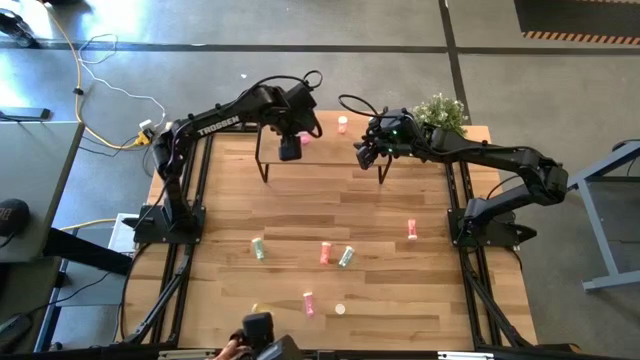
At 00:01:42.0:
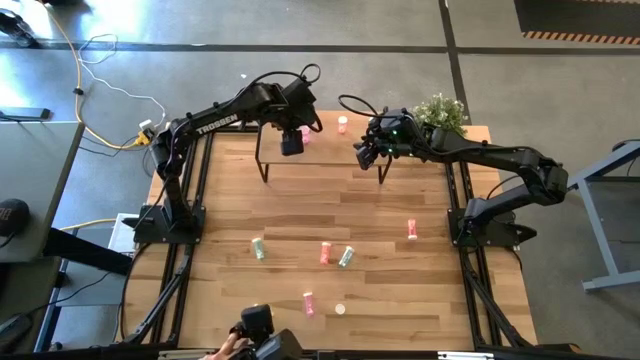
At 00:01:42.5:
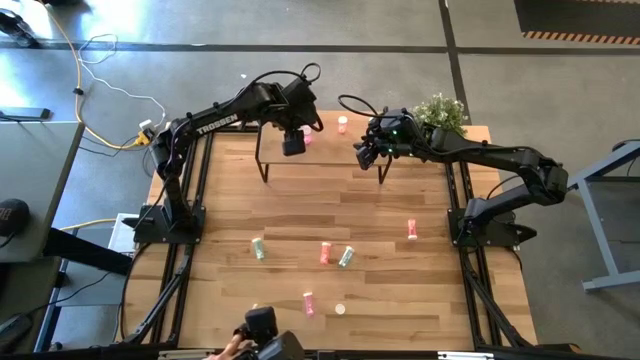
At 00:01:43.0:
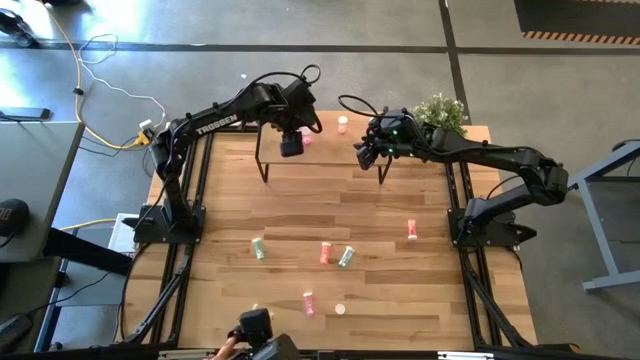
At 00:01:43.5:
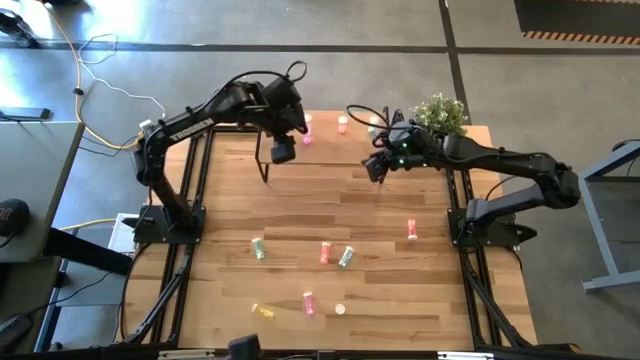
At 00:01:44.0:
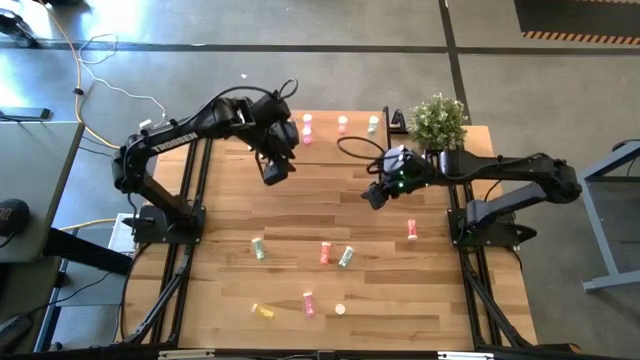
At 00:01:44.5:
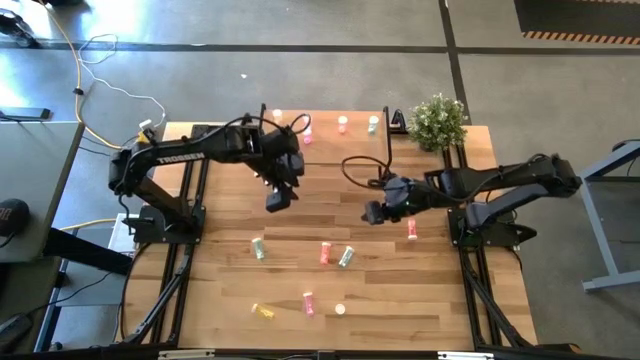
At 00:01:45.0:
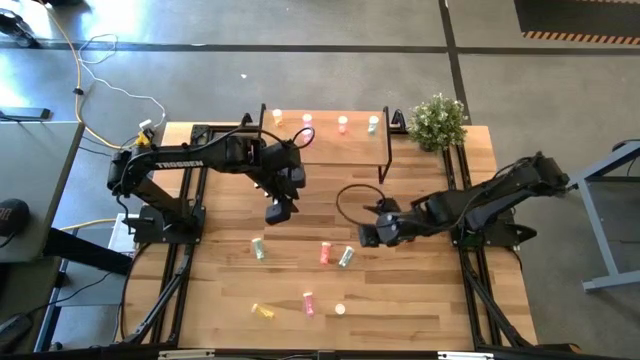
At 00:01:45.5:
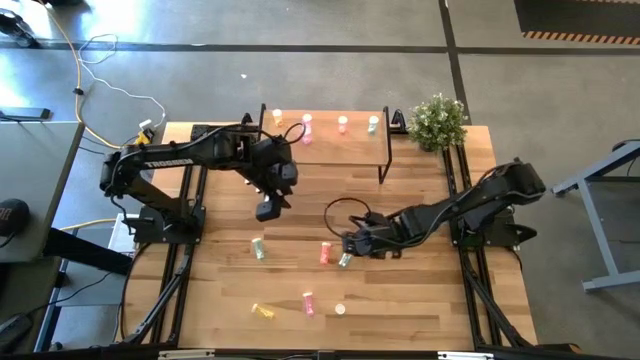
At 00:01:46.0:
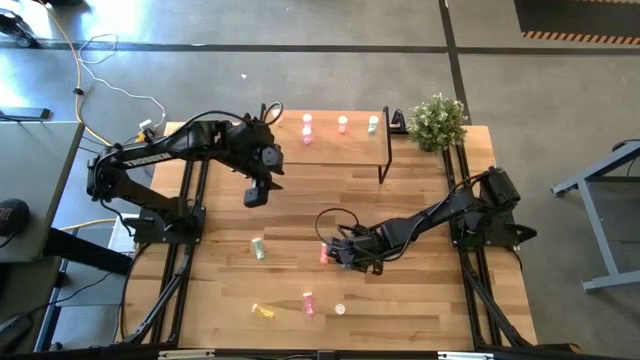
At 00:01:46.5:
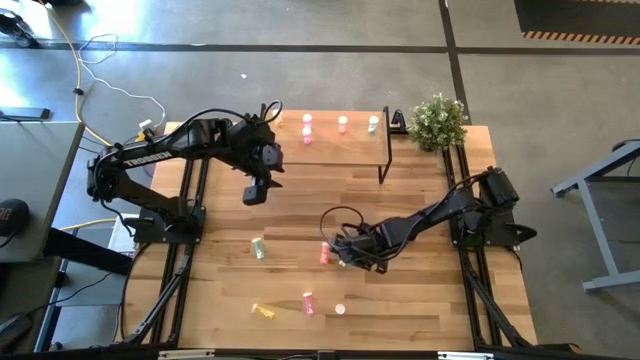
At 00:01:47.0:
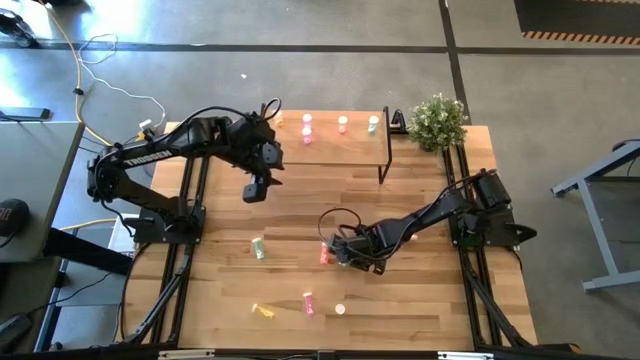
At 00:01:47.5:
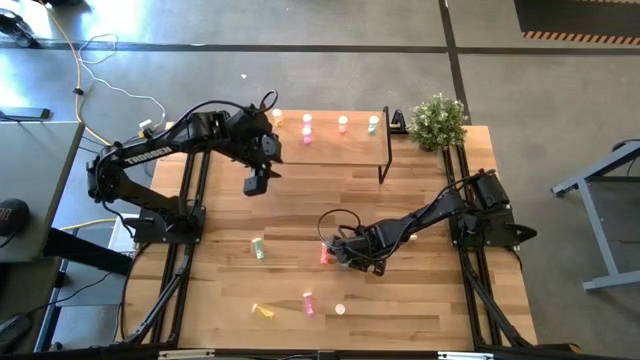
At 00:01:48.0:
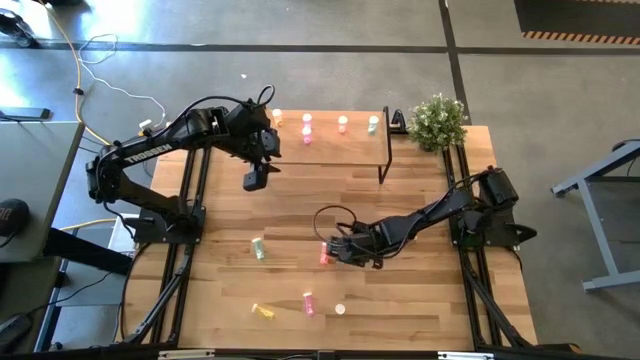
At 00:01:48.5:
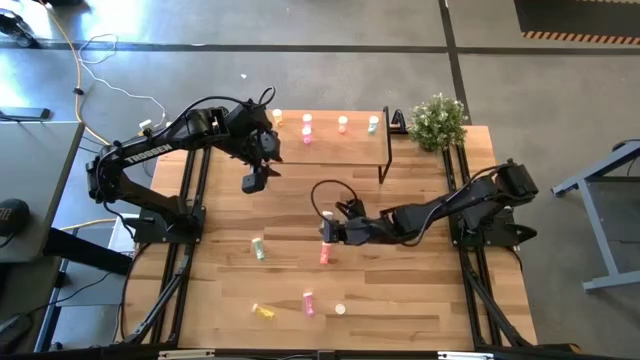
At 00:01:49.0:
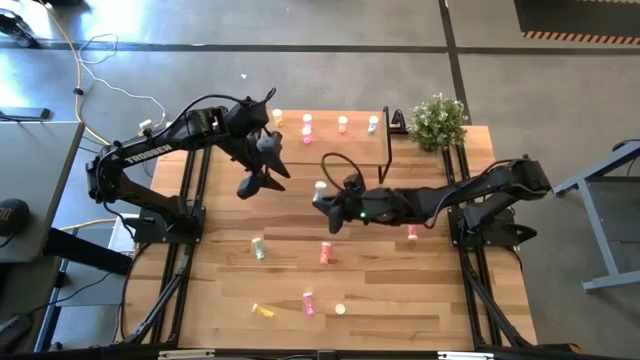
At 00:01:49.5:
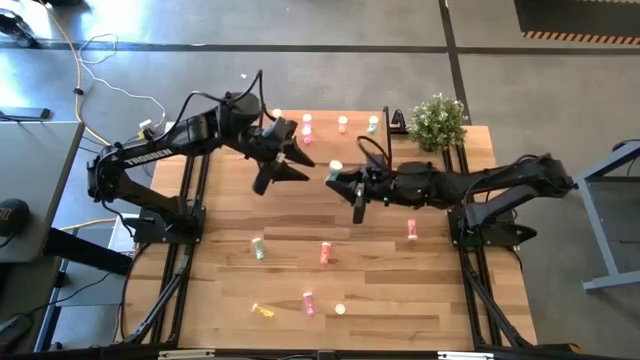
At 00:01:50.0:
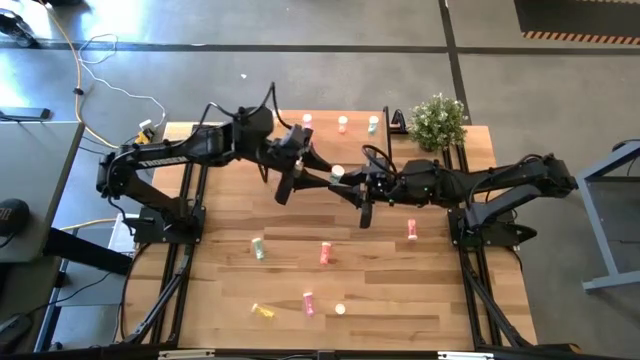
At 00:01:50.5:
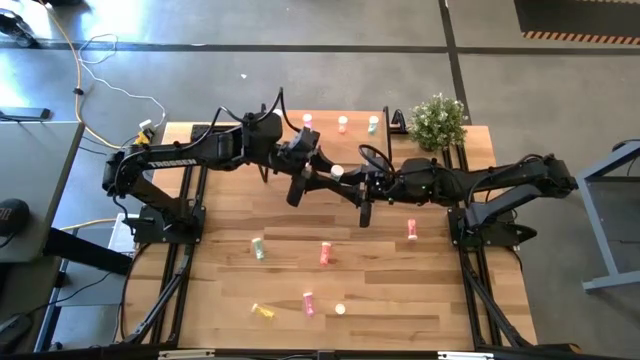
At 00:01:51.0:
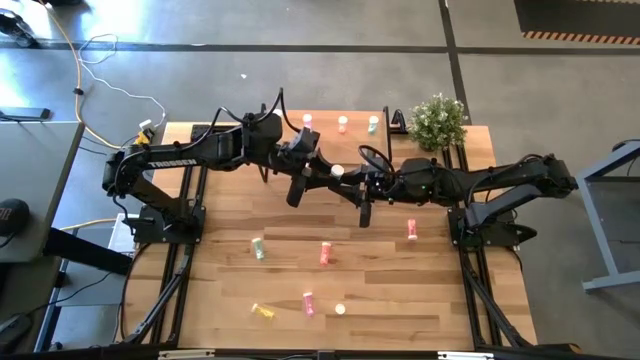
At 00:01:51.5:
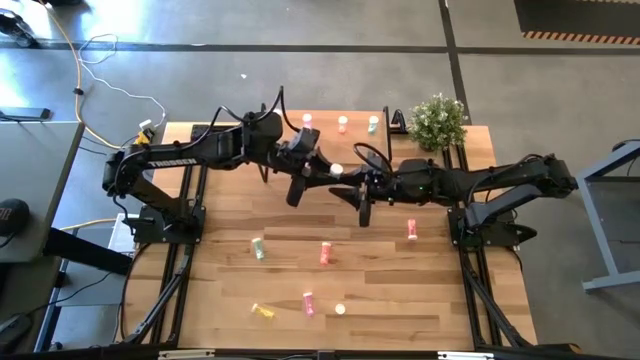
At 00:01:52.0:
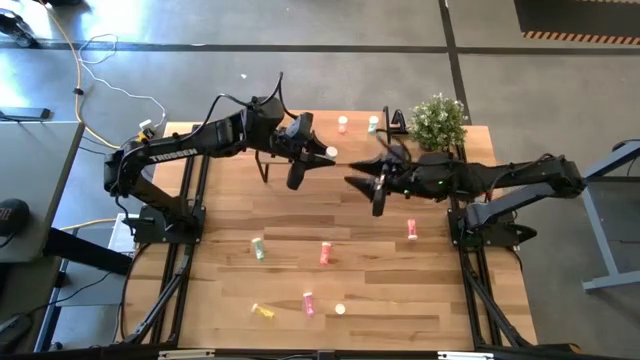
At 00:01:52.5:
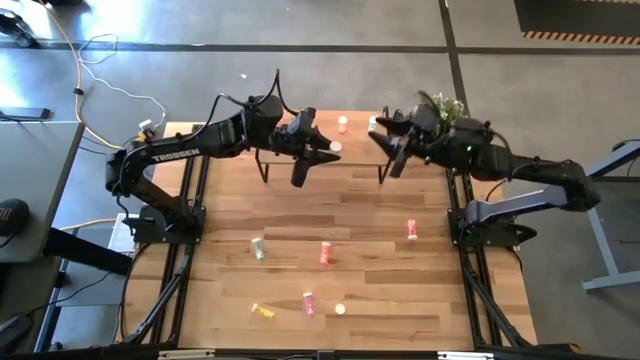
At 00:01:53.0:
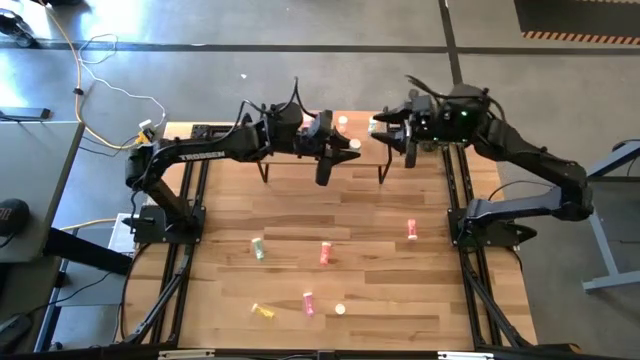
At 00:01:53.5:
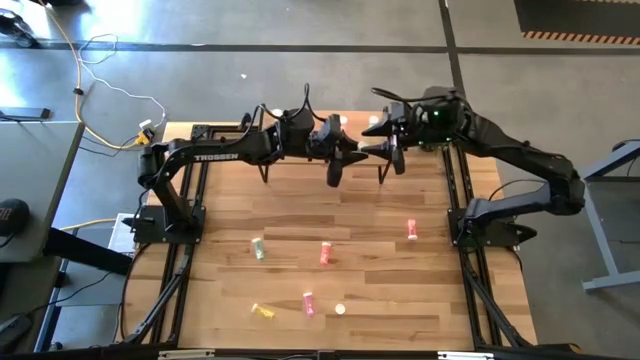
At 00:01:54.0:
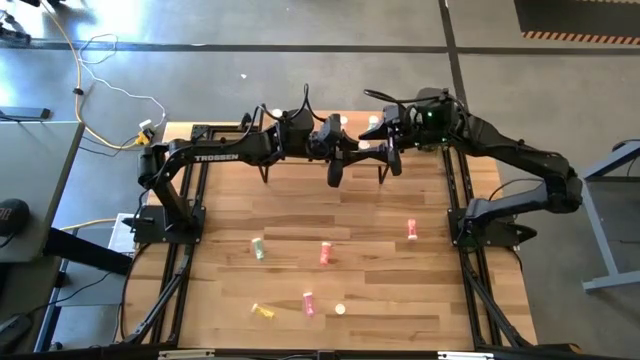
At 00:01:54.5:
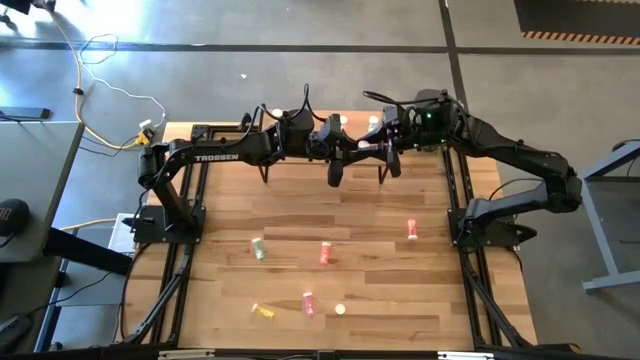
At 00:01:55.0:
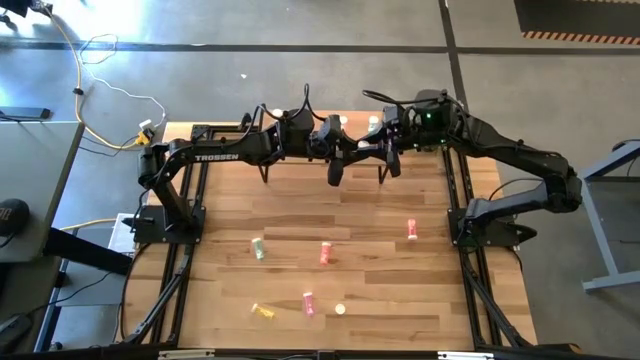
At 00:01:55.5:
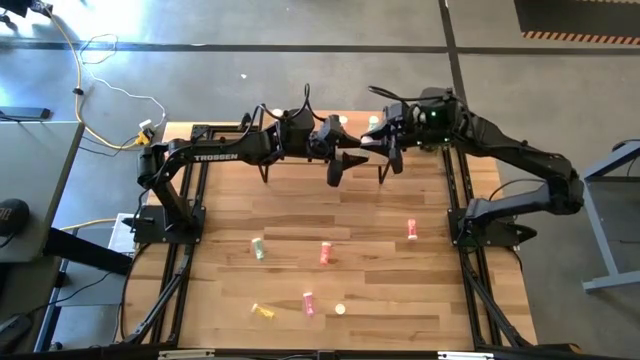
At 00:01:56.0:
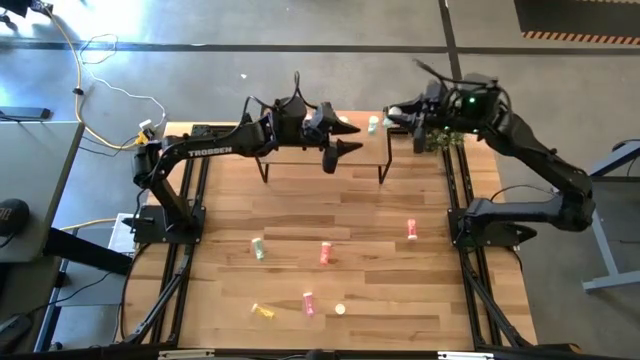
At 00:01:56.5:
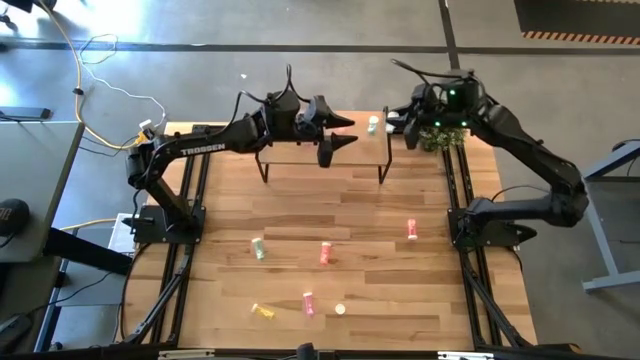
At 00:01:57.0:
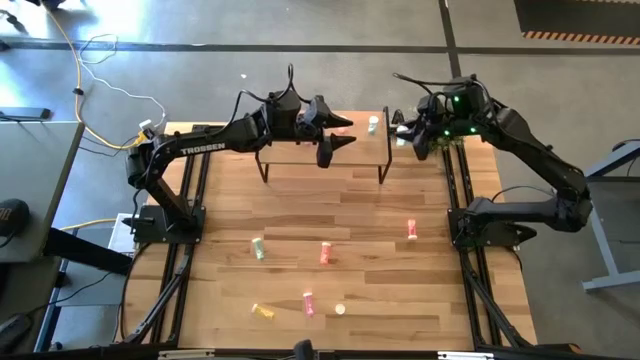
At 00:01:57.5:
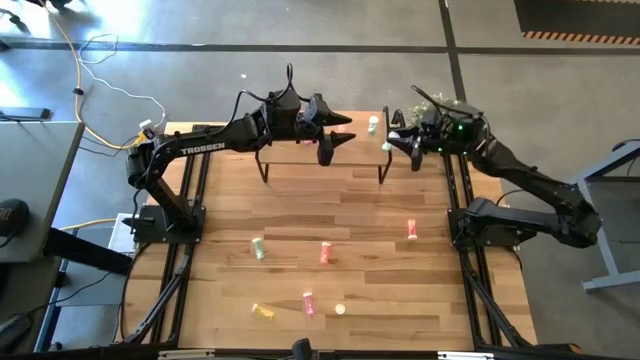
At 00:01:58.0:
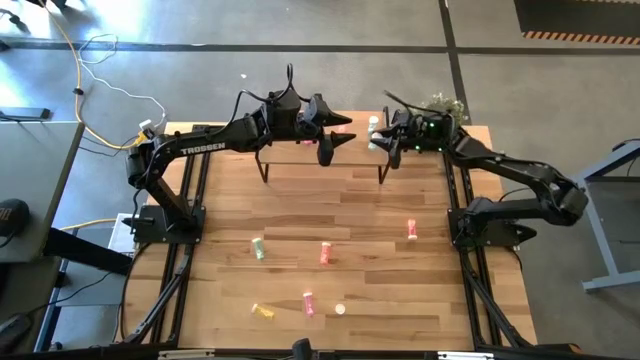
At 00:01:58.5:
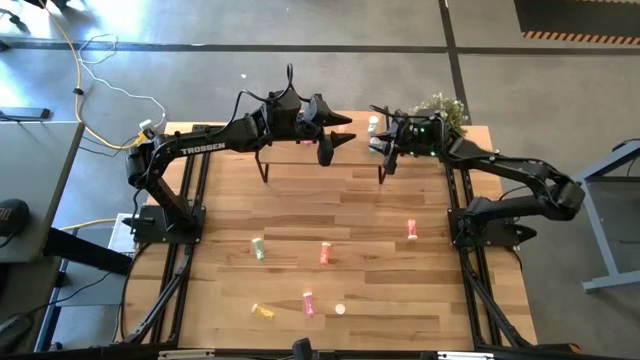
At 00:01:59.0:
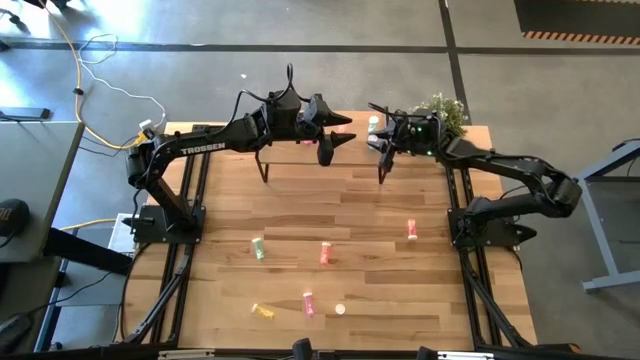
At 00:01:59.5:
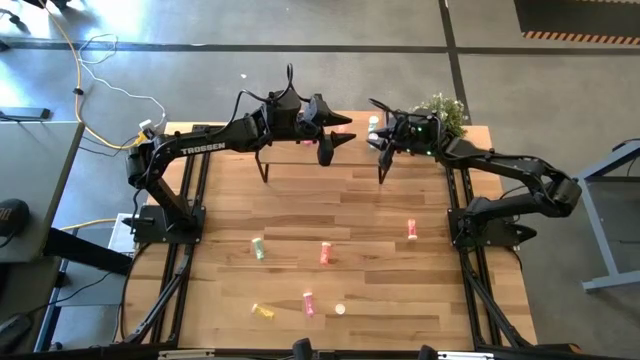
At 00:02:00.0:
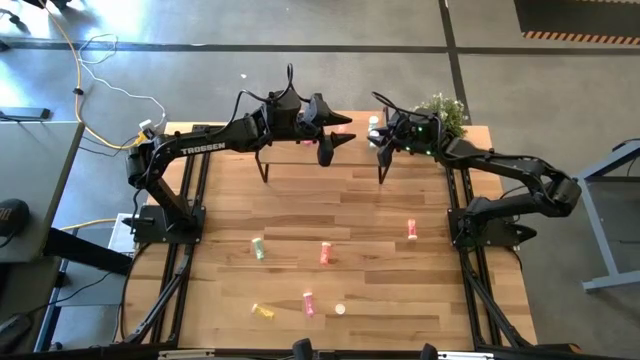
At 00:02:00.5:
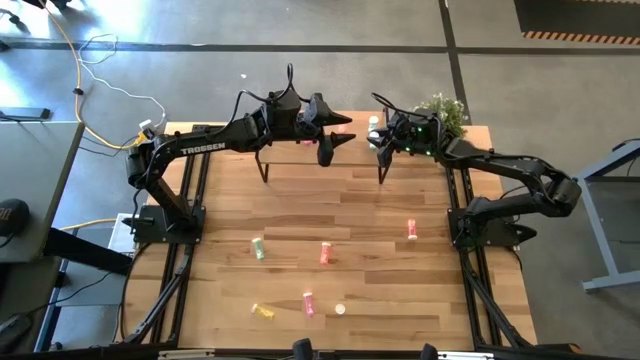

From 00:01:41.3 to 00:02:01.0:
Task: Pick and place medicine bottles onto shelf by color
Put the right blue pill bottle on the shelf aligned with other blue pill bottles
